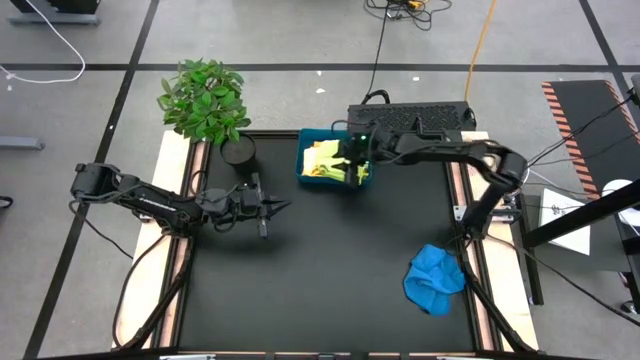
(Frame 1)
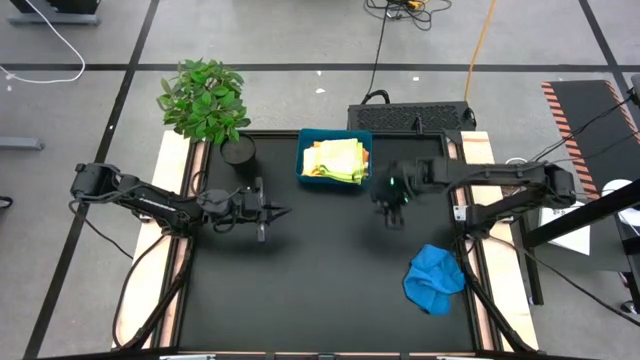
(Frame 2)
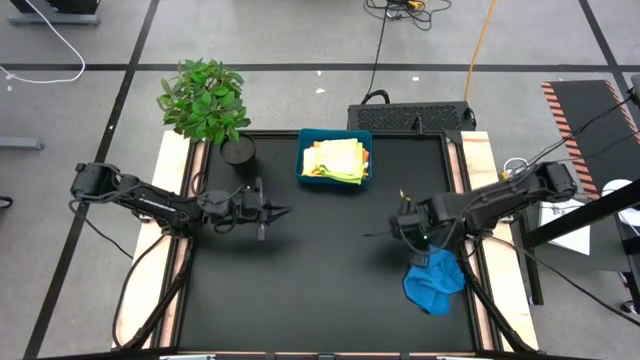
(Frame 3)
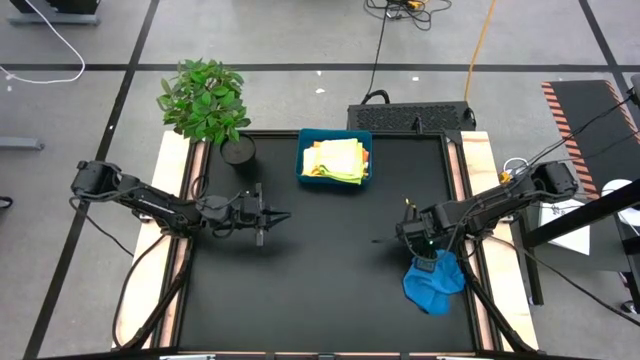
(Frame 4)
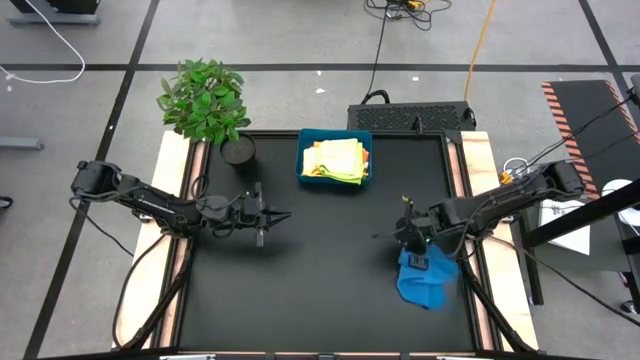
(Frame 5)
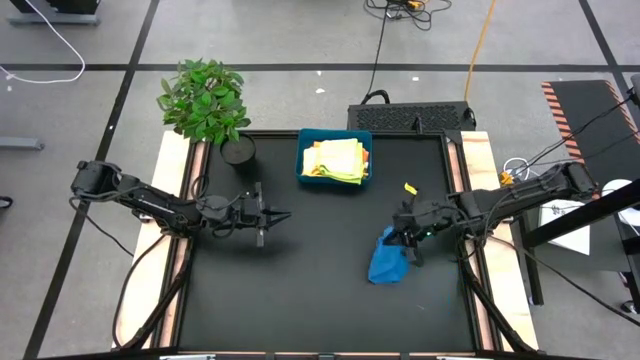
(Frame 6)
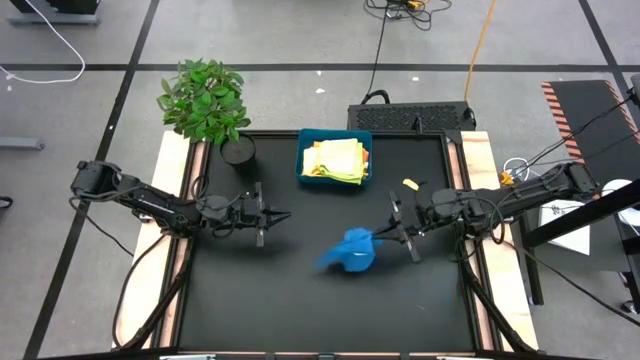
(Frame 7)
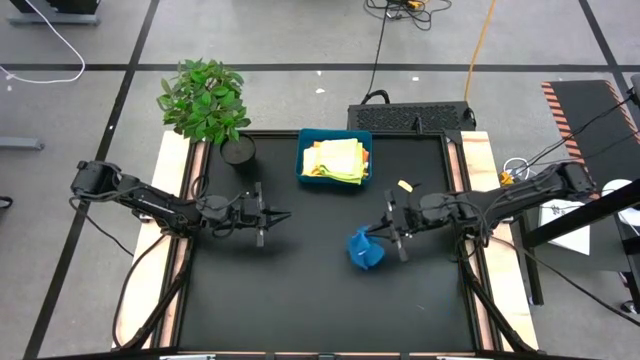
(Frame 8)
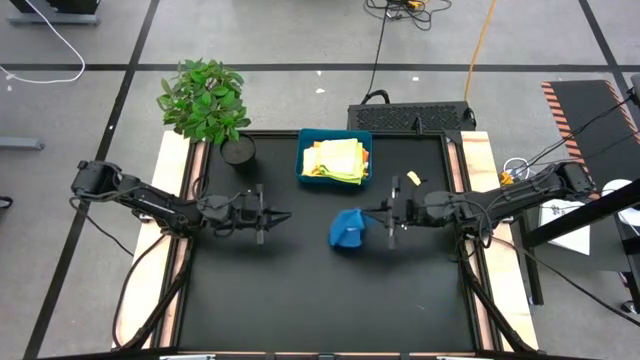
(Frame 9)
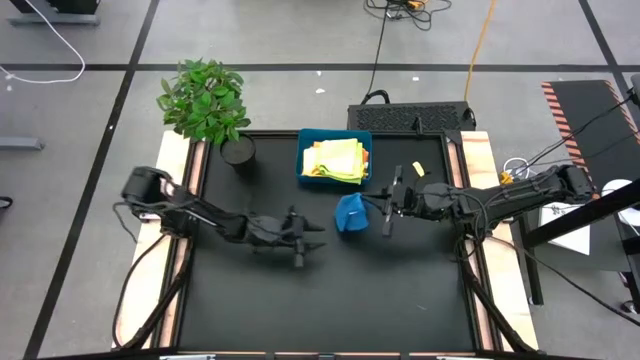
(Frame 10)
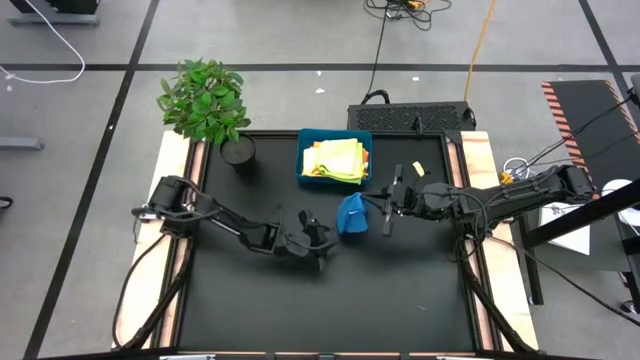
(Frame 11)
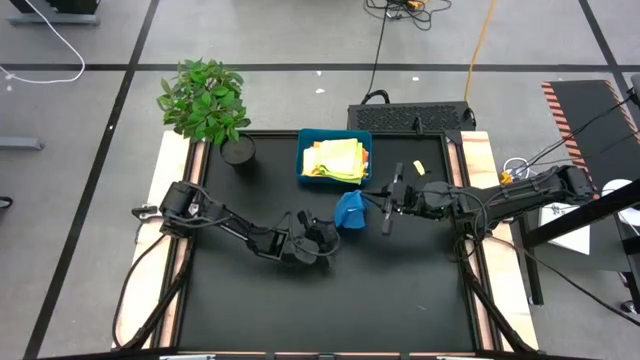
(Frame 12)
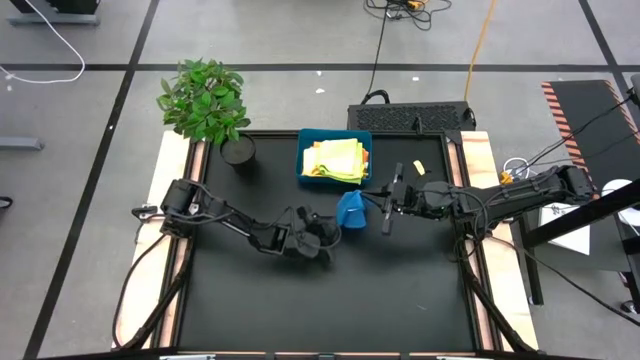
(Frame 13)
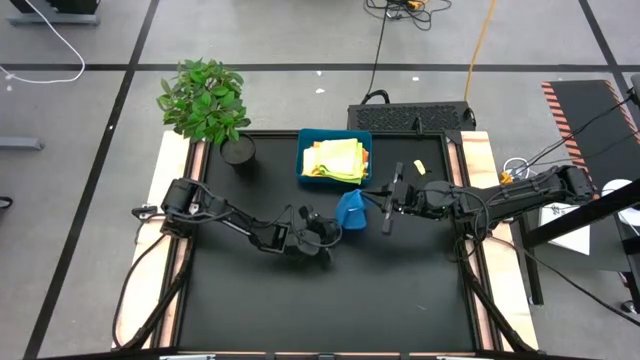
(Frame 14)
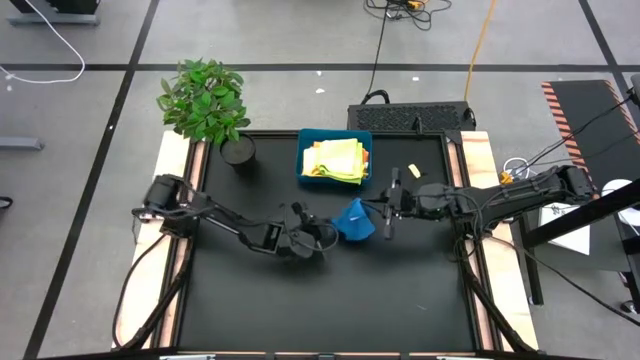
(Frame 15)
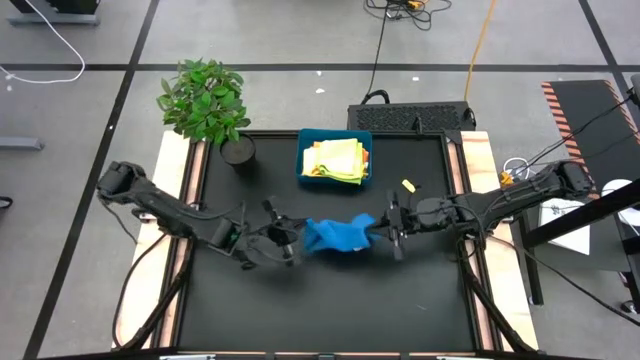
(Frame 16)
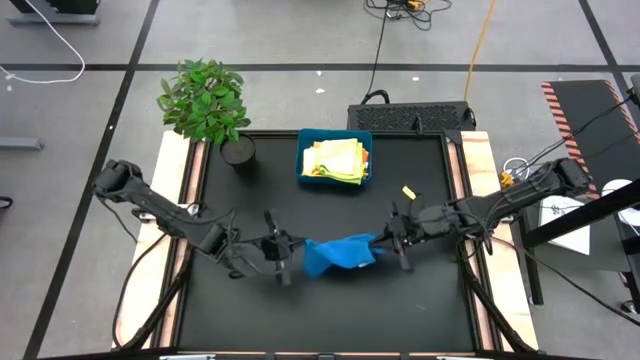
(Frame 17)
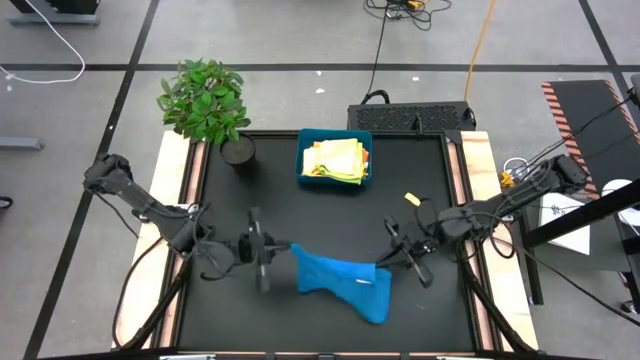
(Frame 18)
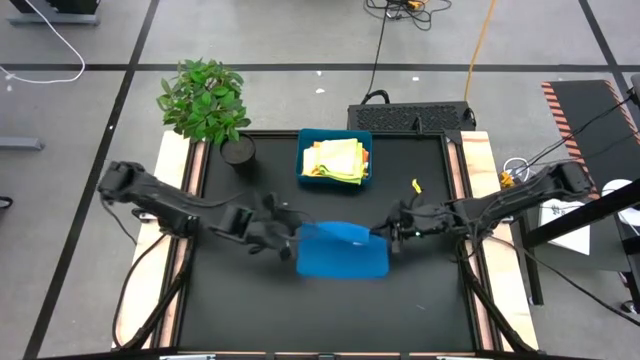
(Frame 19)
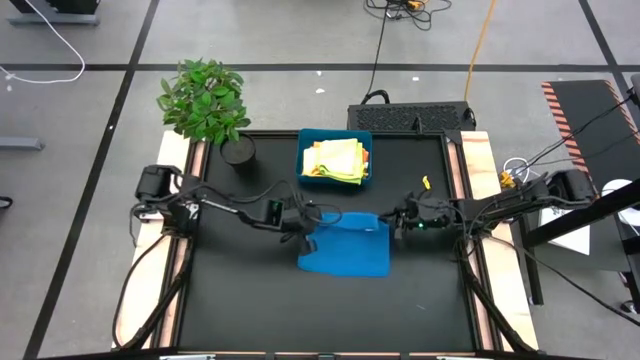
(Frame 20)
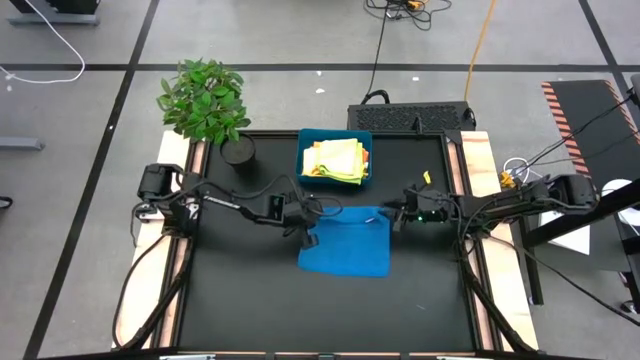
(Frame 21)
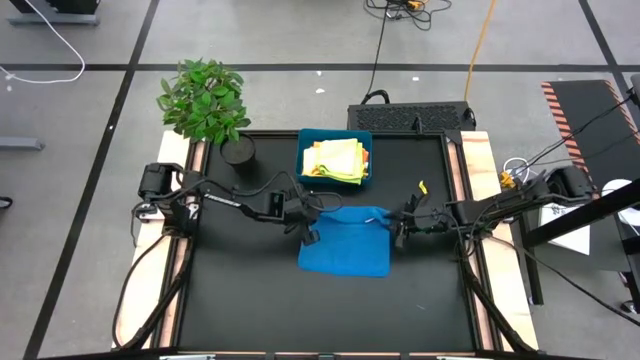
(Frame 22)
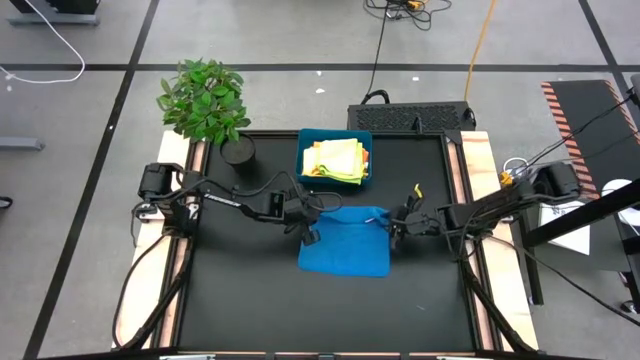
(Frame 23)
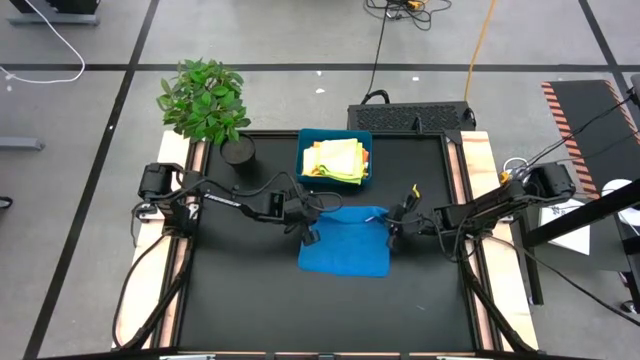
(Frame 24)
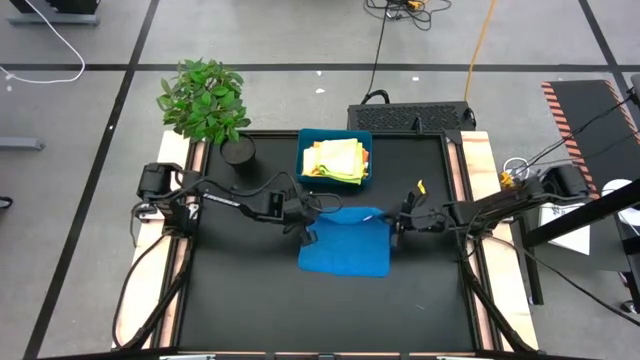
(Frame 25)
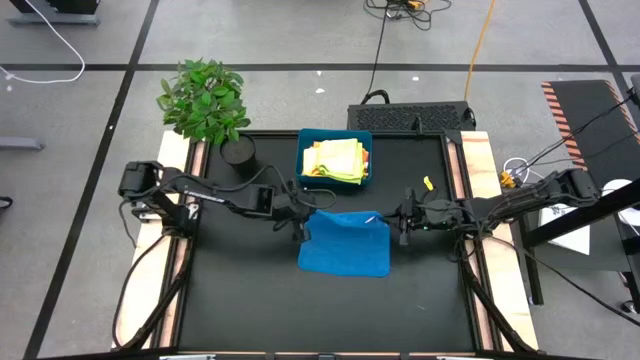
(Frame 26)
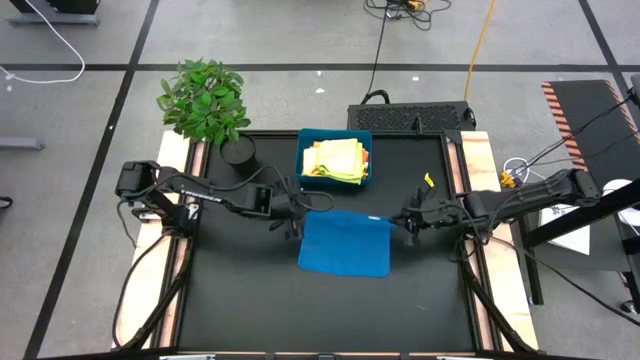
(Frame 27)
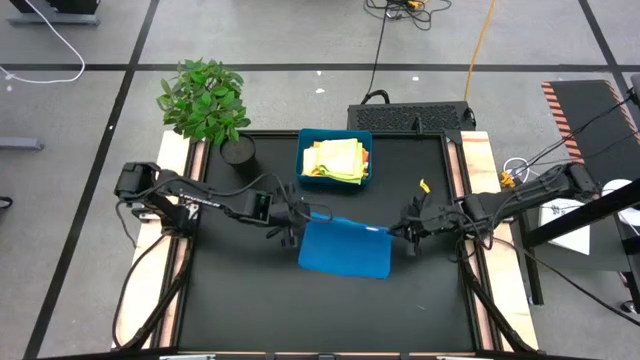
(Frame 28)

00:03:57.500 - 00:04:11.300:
Task: Fold microfiber towels
Fold the blue microfiber towel

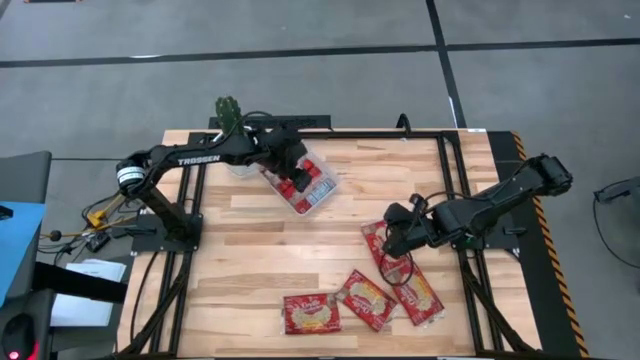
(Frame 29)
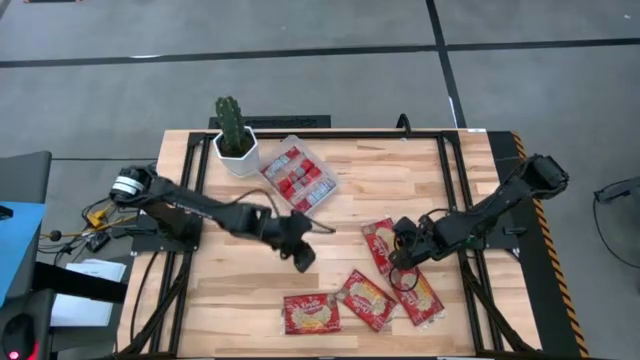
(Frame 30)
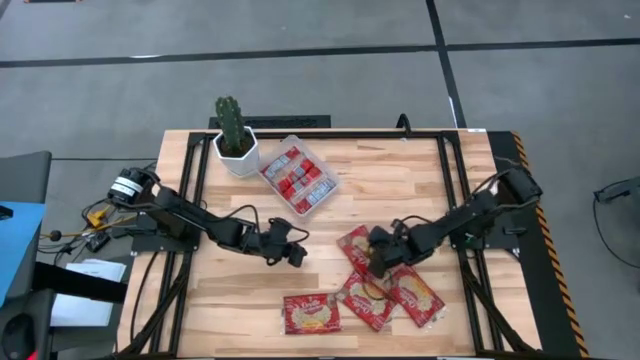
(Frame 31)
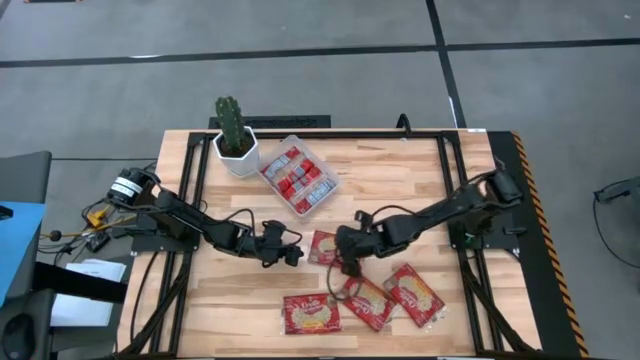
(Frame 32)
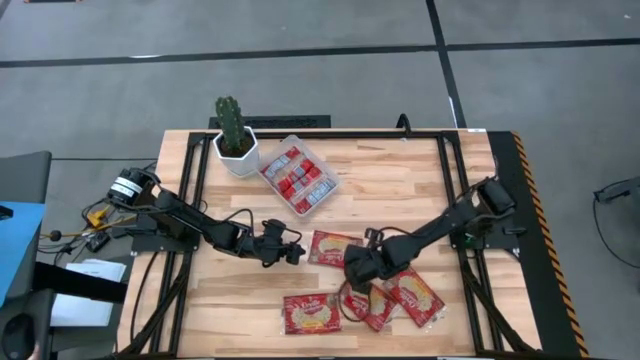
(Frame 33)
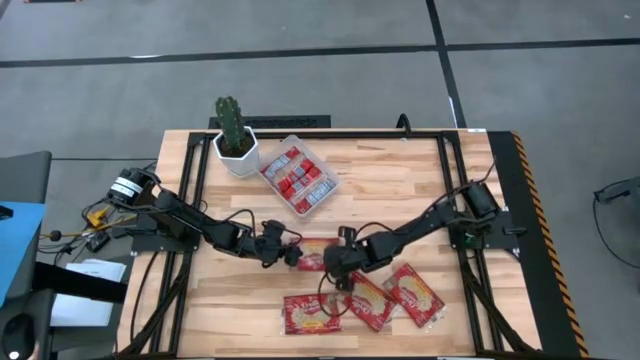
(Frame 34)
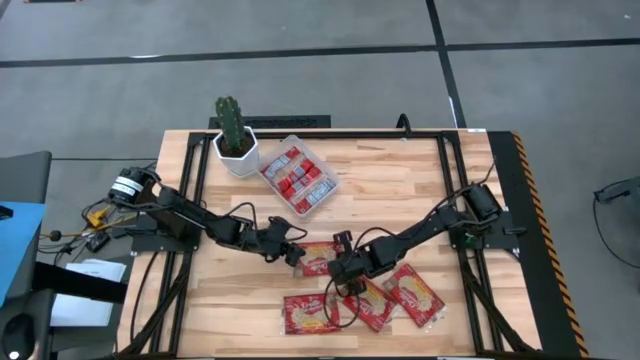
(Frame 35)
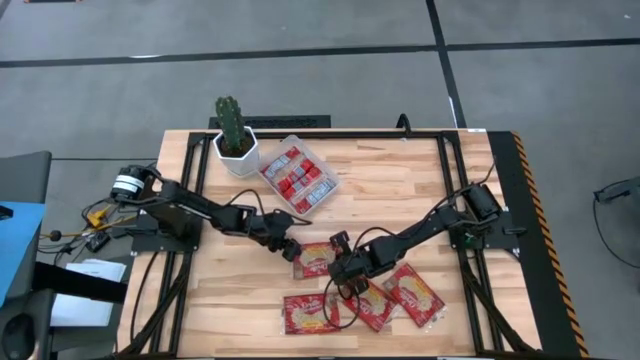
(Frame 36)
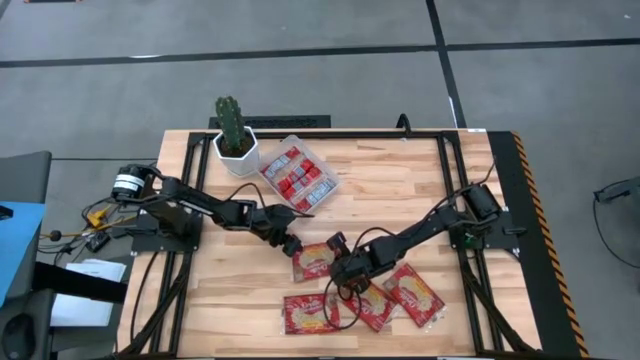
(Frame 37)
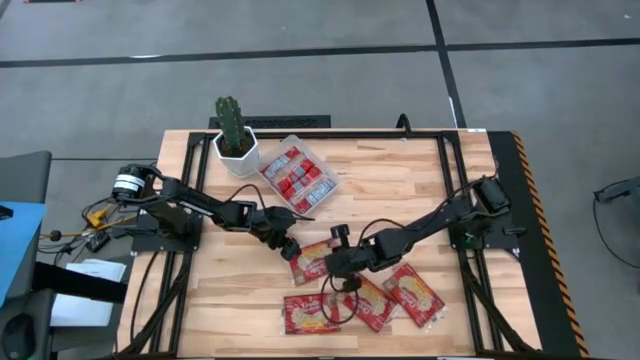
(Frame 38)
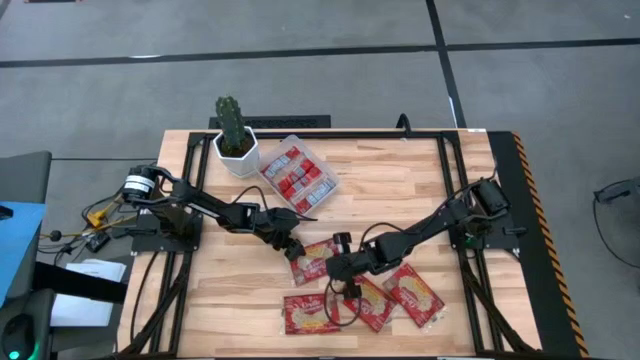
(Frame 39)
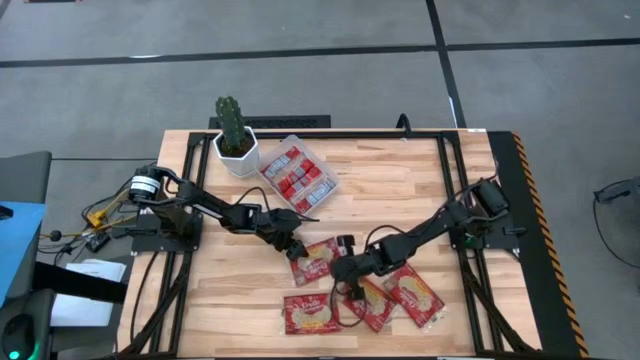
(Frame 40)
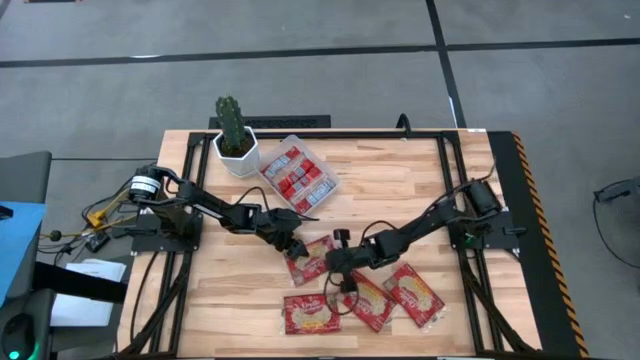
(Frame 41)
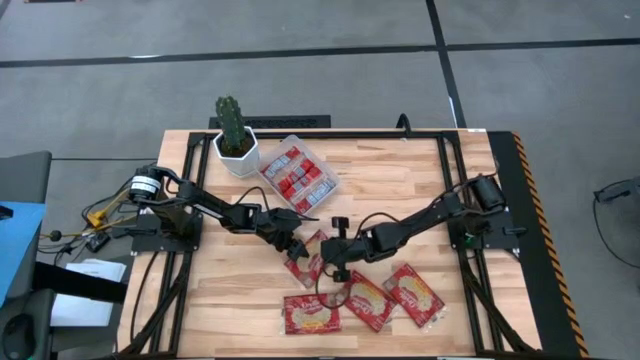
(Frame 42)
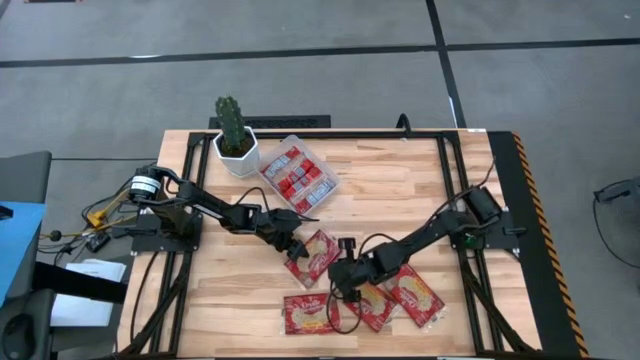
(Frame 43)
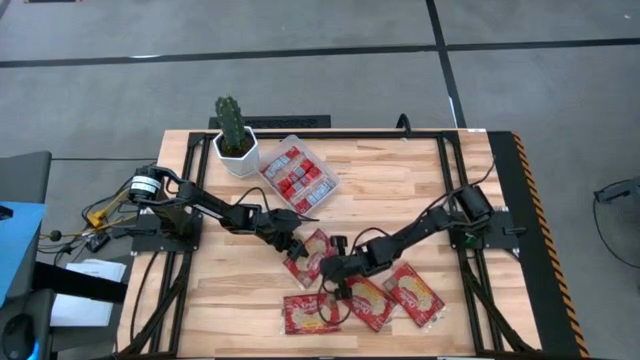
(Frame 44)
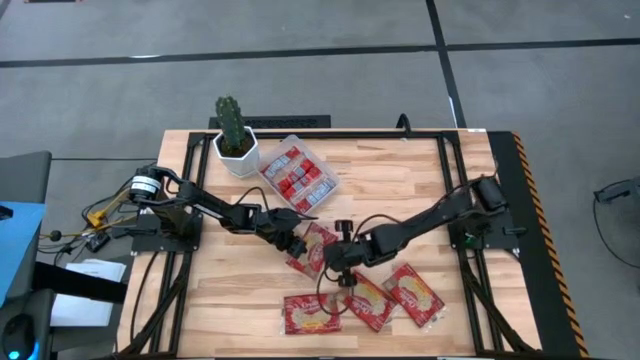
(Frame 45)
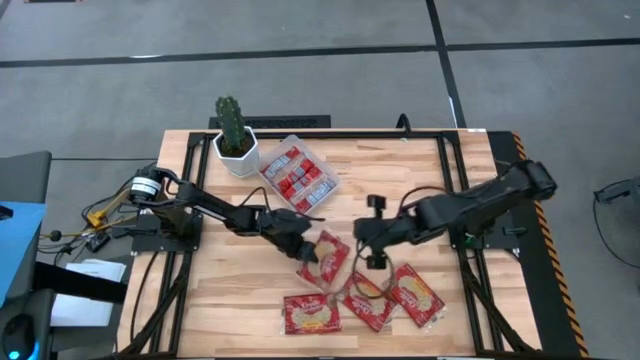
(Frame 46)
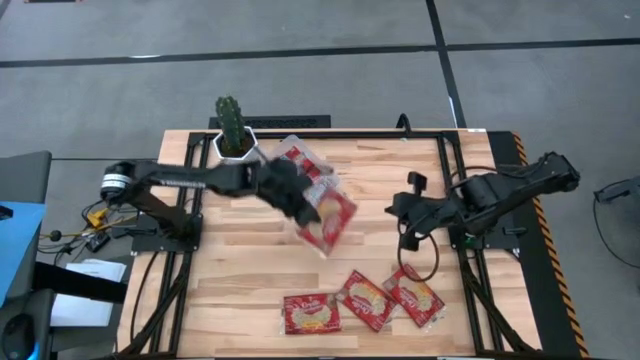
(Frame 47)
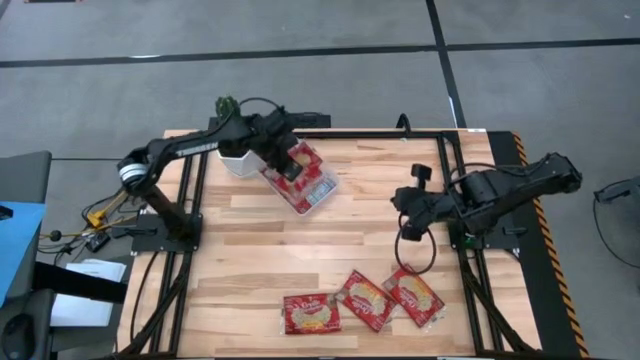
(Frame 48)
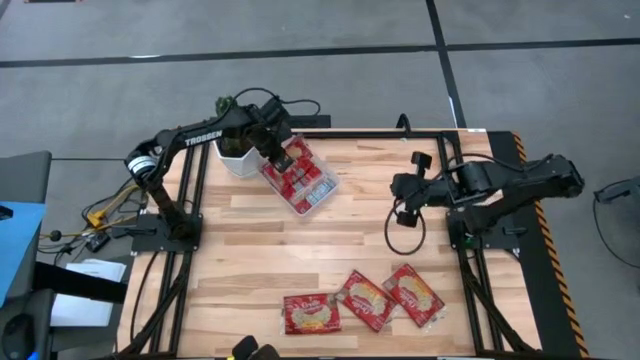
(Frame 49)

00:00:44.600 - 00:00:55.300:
Task: Sort popcorn bags into baskets
Put the red popcorn bag into the transparent bin
